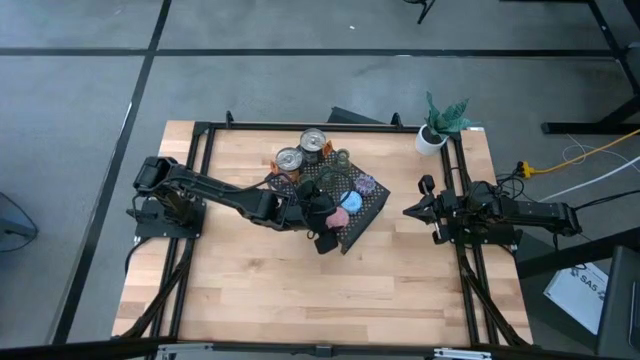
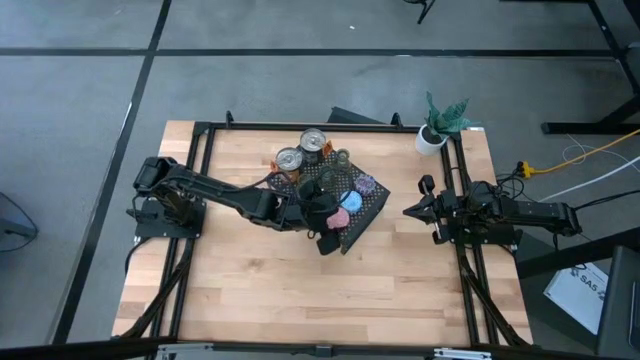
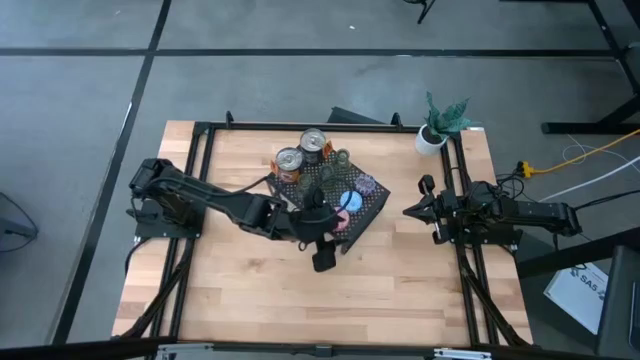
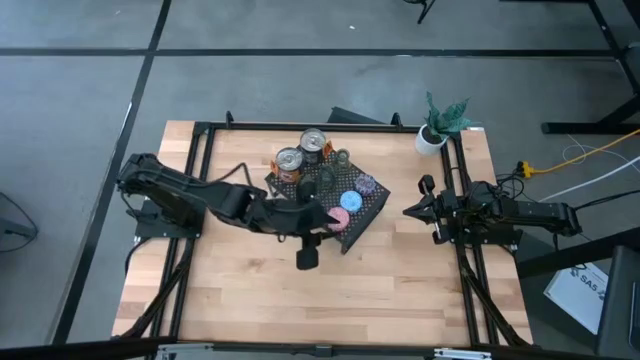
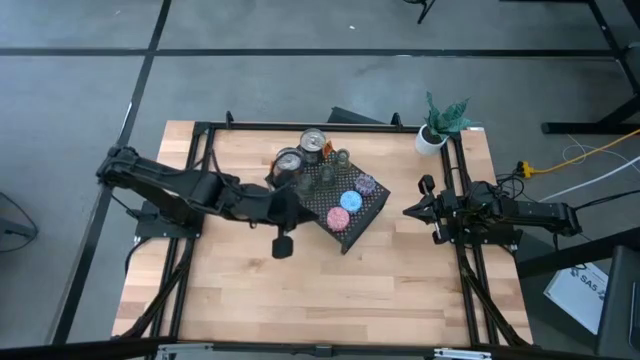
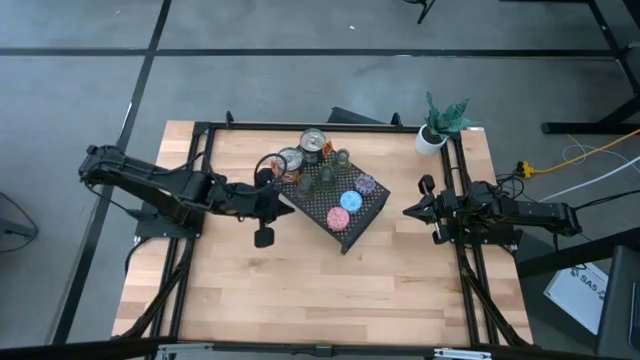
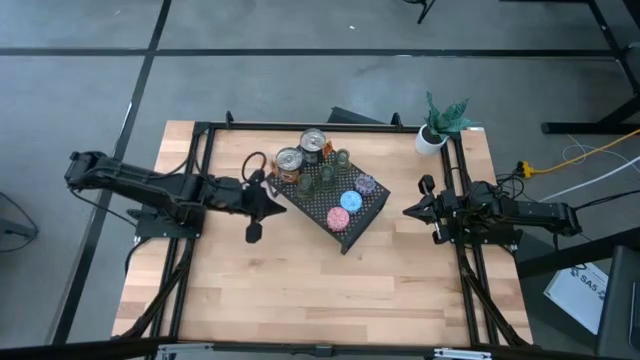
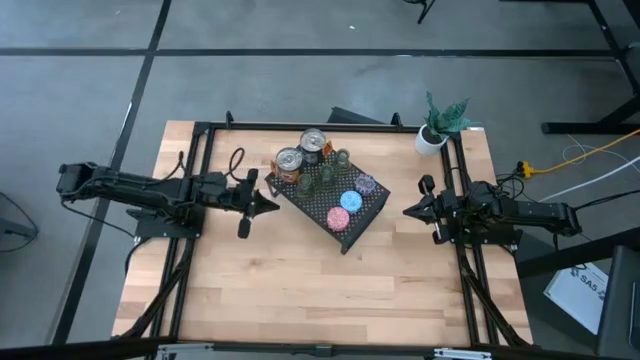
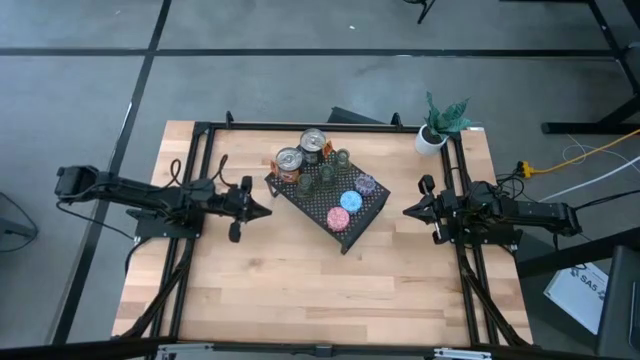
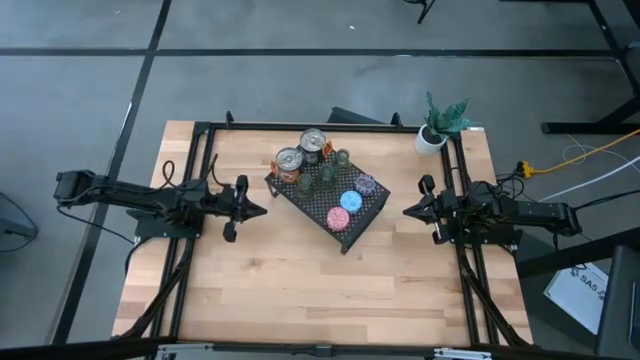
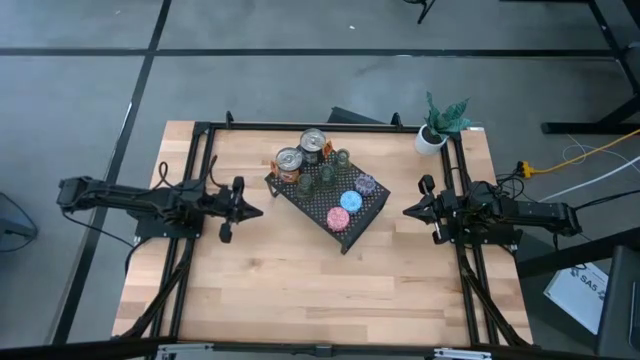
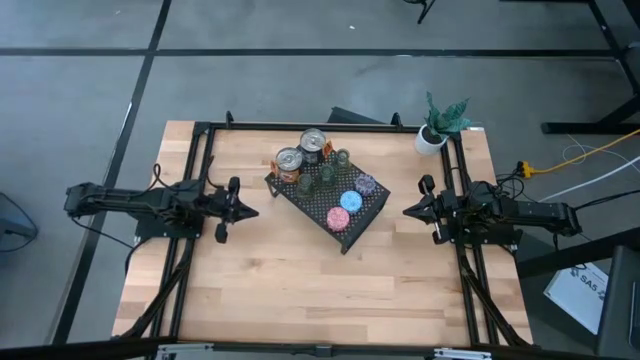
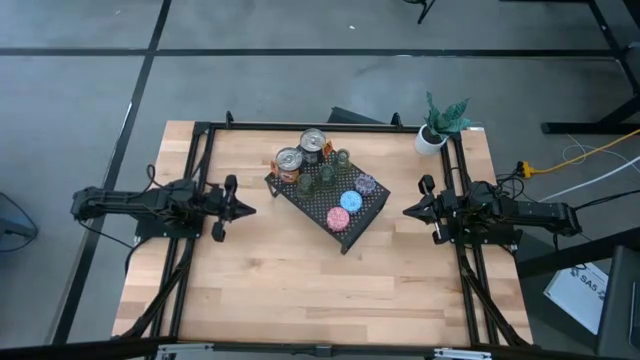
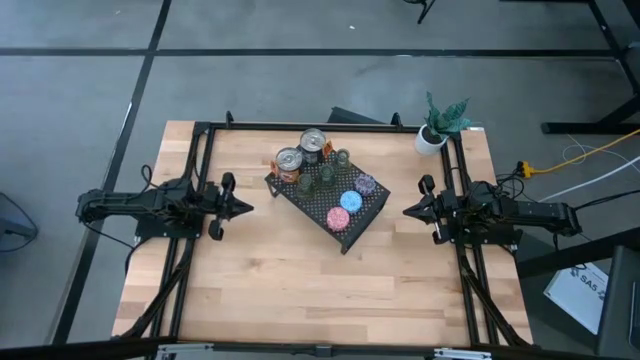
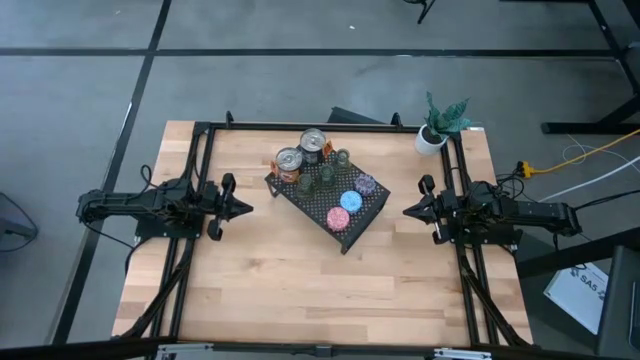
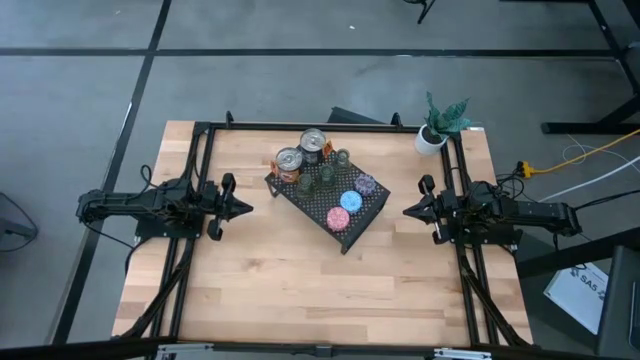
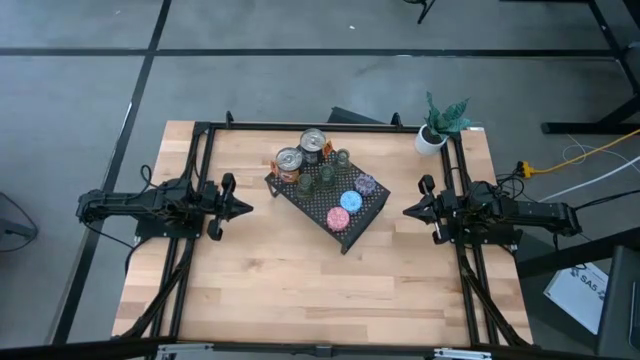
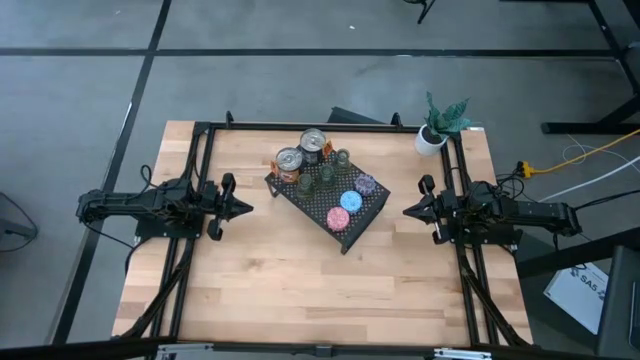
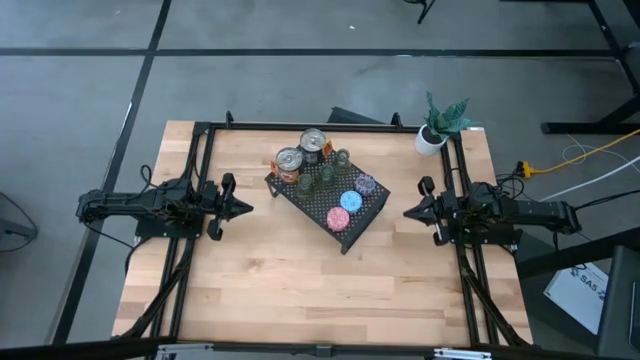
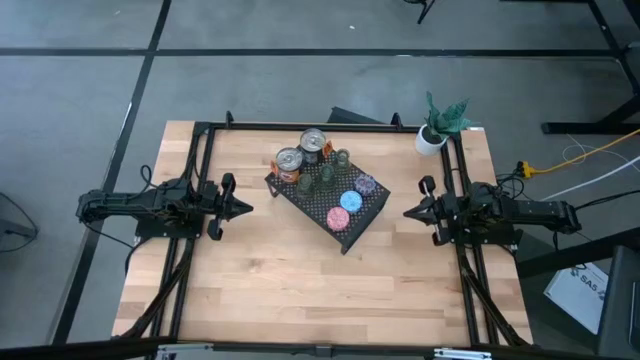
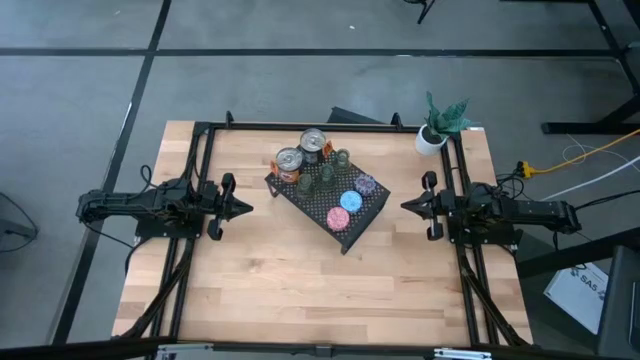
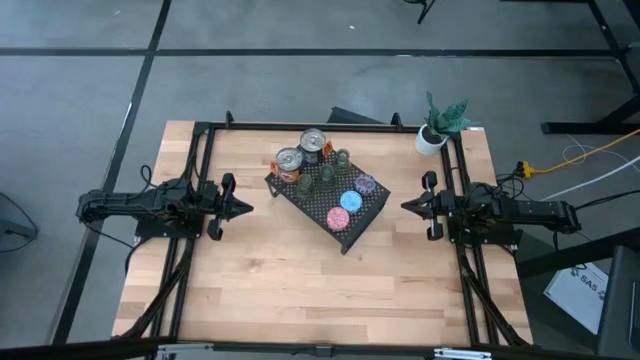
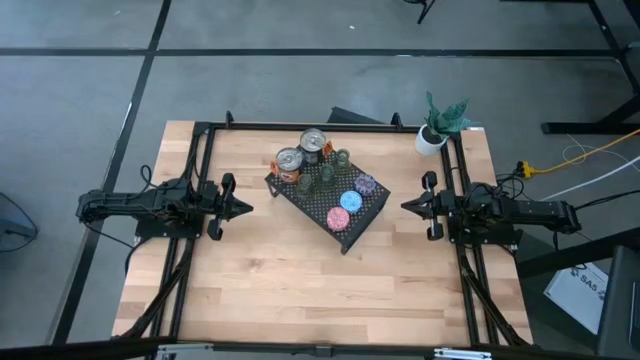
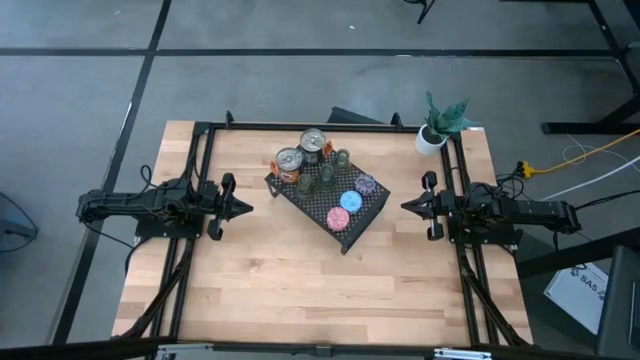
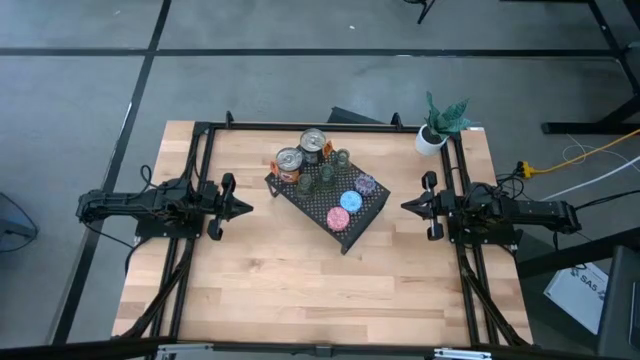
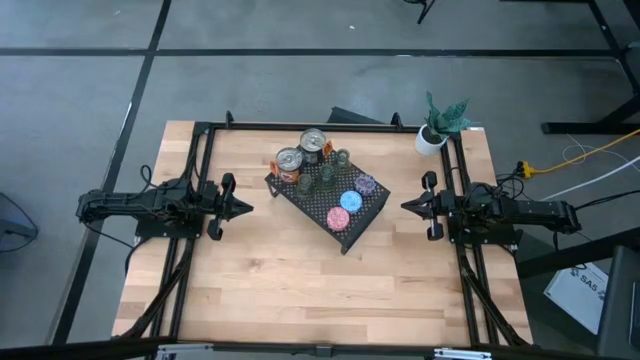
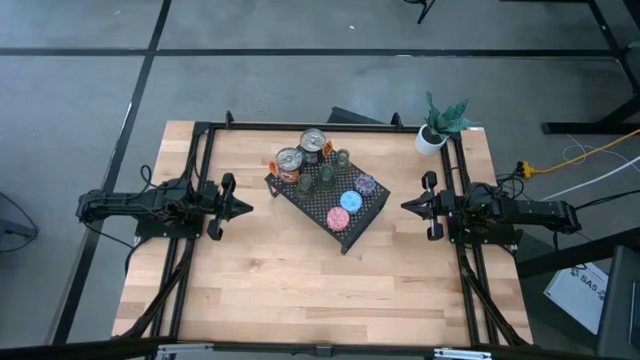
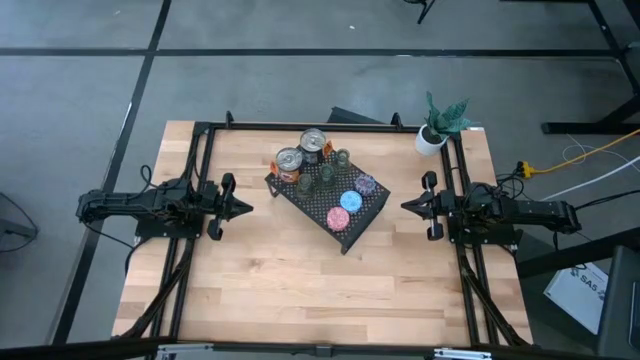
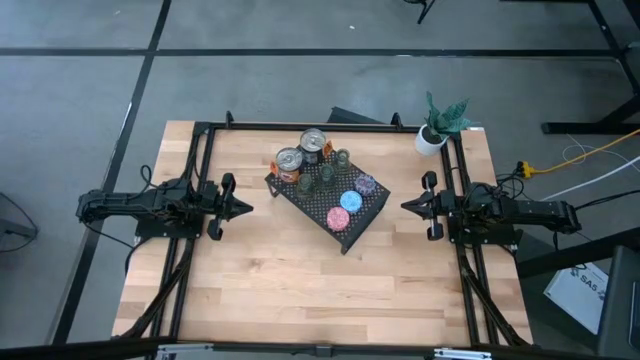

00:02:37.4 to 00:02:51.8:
Task: Pick & Place candle stick holders
Return to Home Position

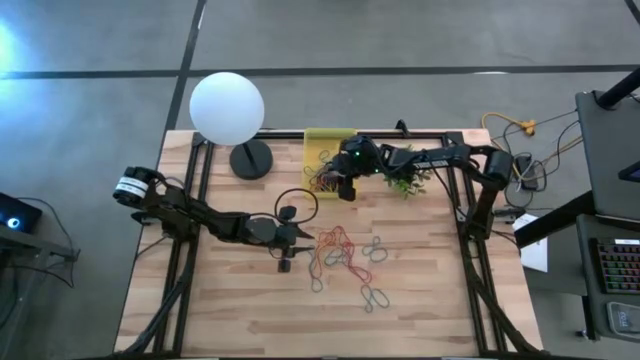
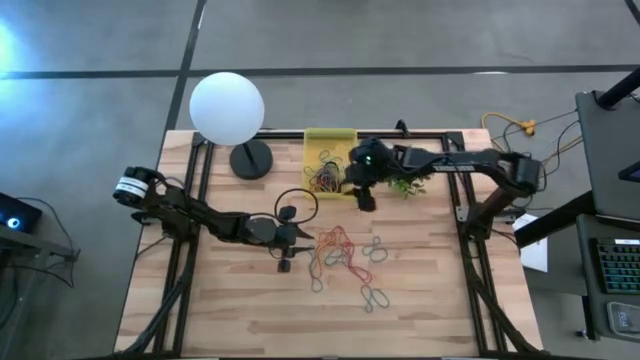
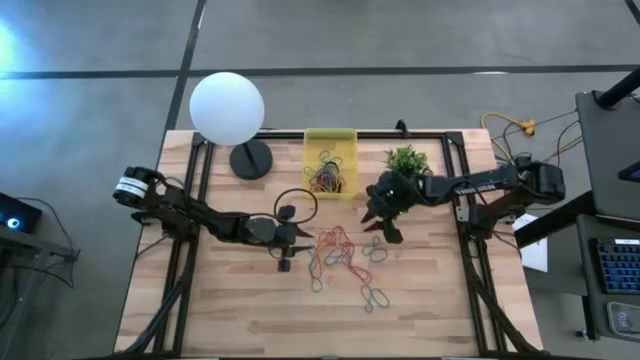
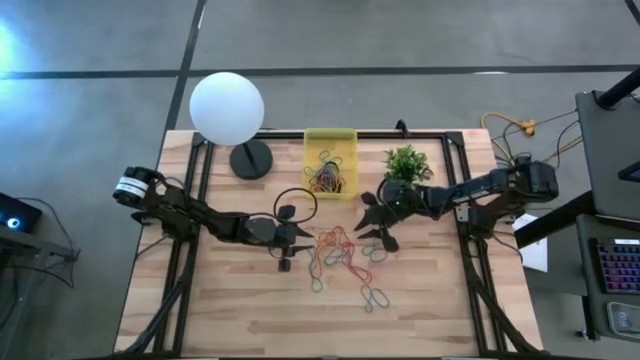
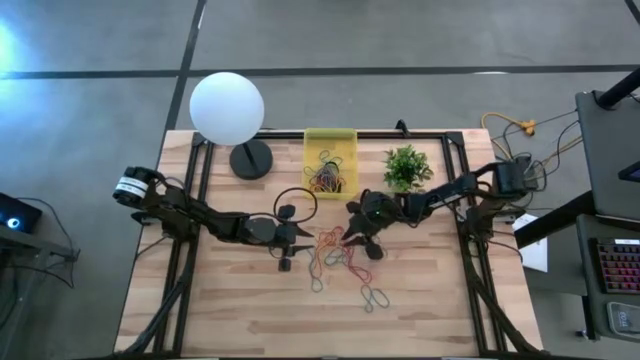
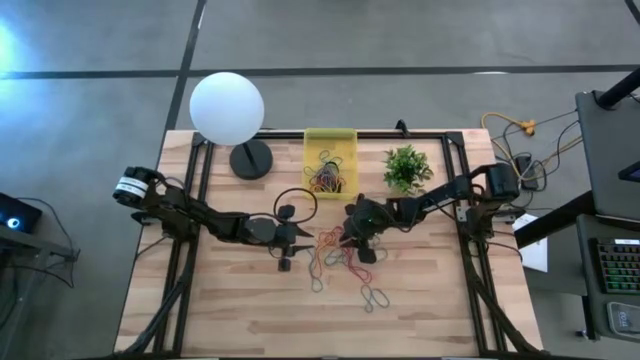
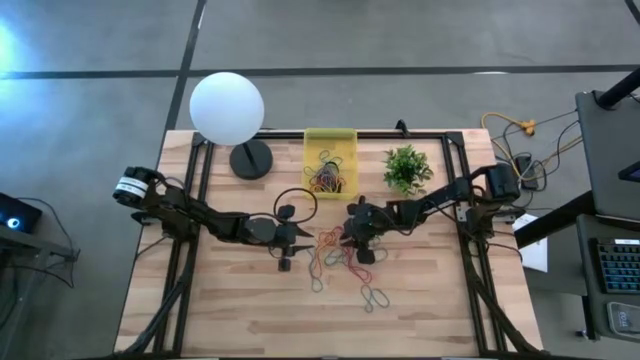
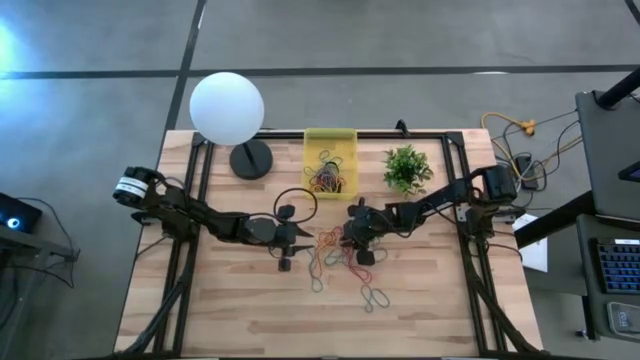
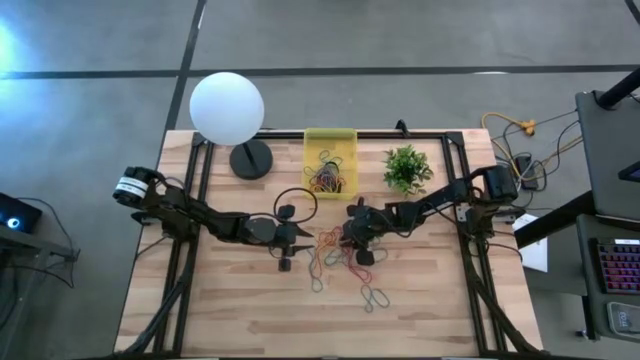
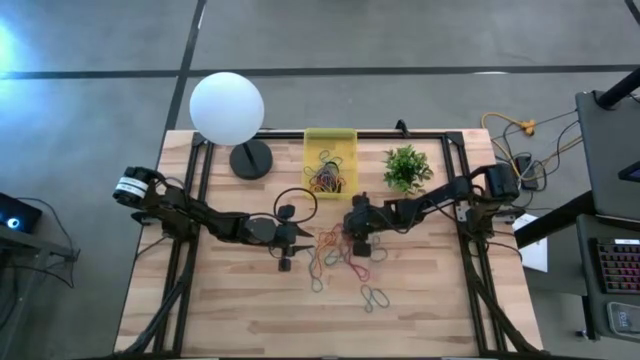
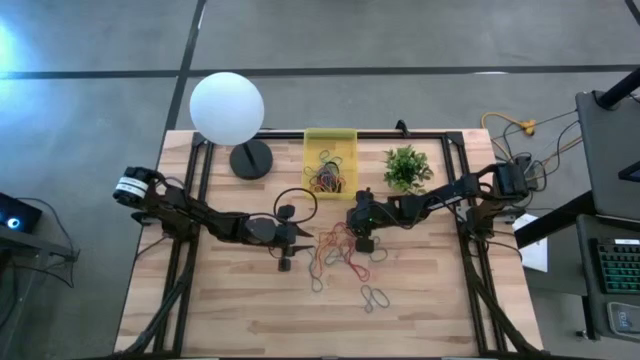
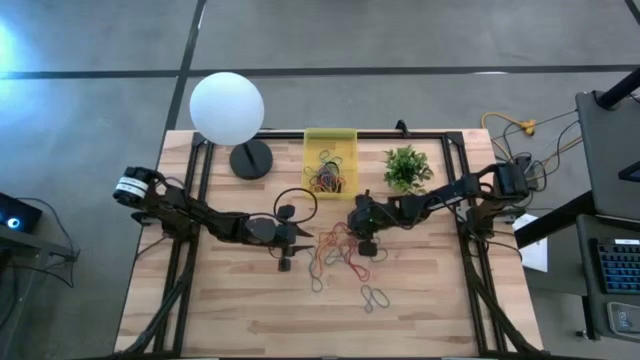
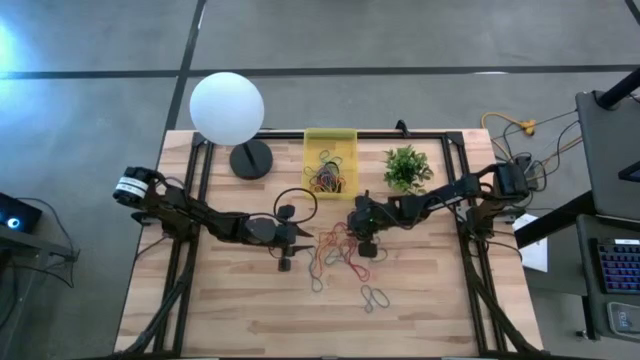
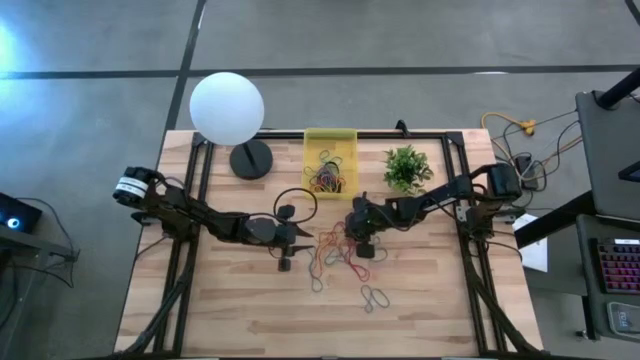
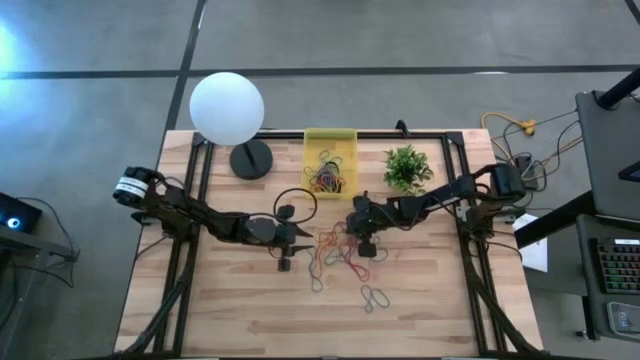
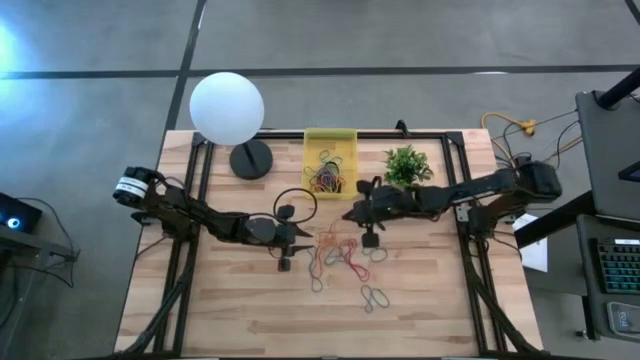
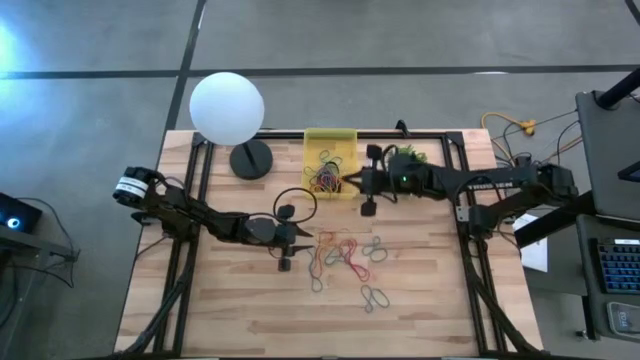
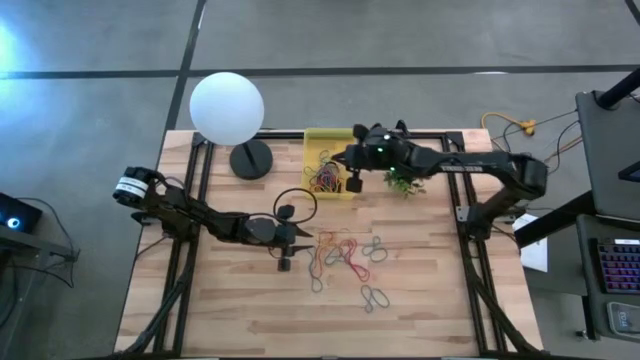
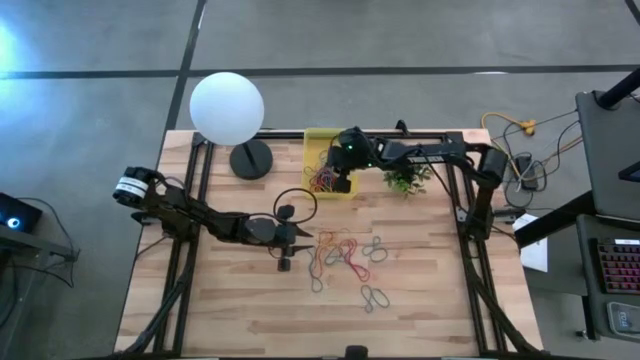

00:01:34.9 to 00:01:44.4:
Task: Pick and place rubber bands into bin
Put the red rubber band into the yellow bin
